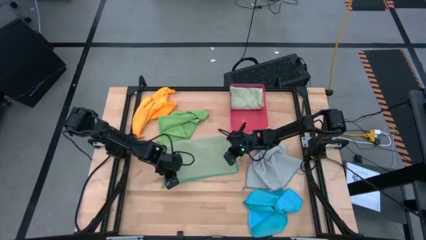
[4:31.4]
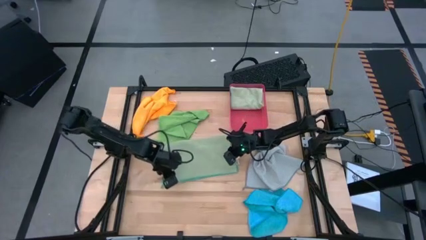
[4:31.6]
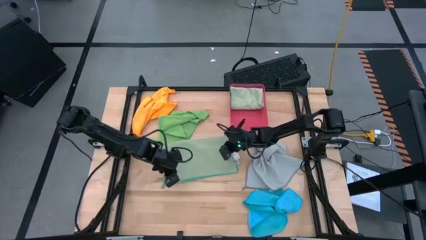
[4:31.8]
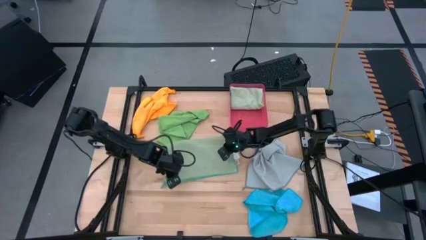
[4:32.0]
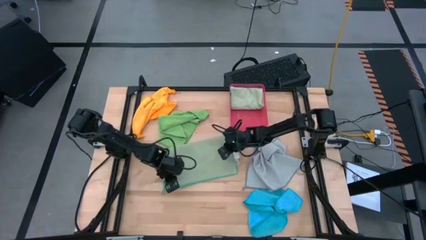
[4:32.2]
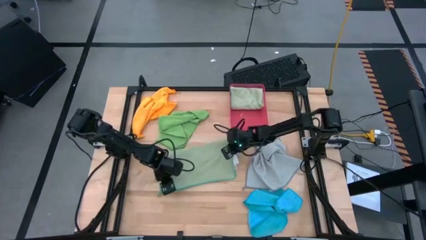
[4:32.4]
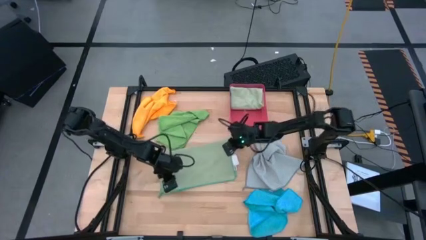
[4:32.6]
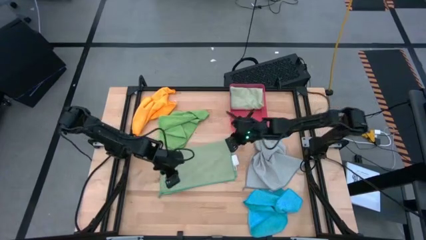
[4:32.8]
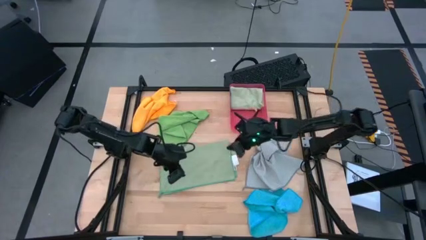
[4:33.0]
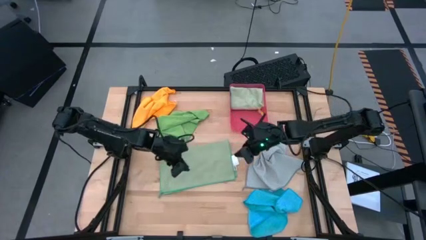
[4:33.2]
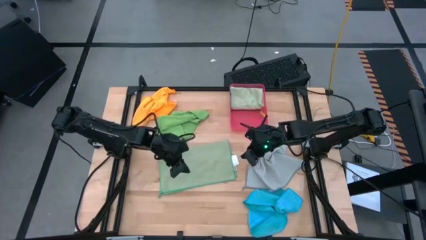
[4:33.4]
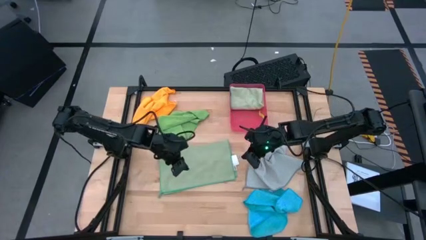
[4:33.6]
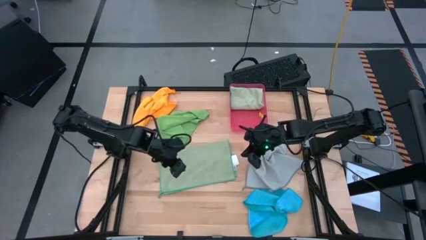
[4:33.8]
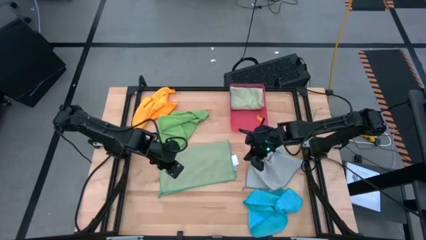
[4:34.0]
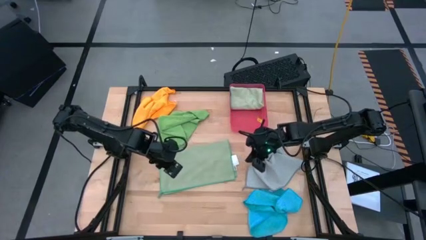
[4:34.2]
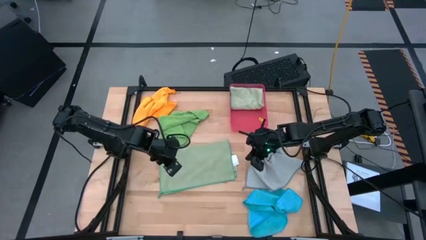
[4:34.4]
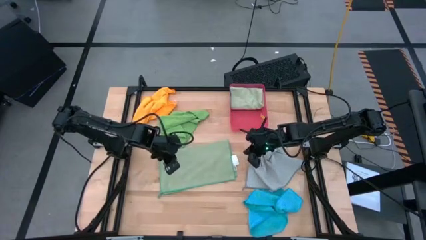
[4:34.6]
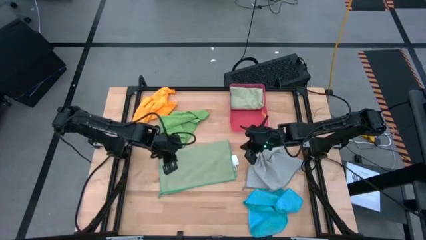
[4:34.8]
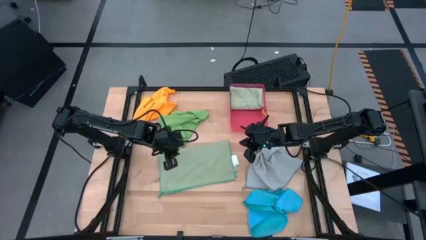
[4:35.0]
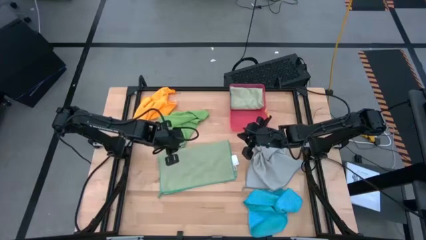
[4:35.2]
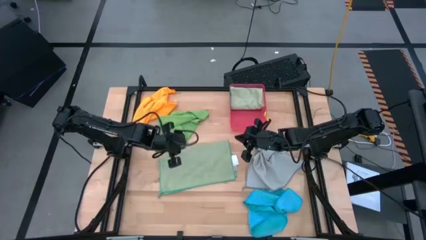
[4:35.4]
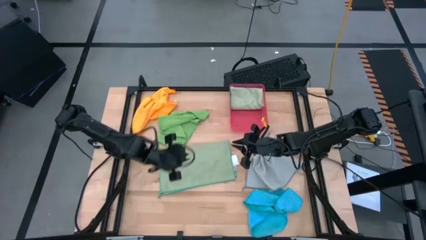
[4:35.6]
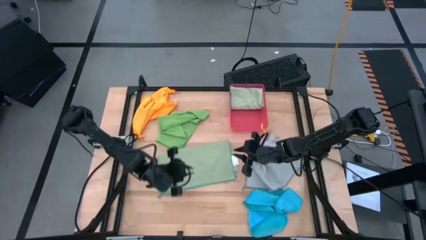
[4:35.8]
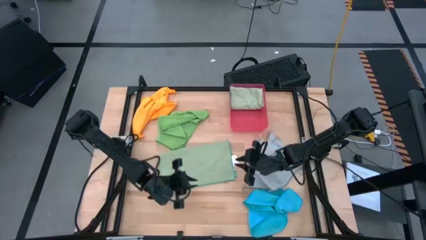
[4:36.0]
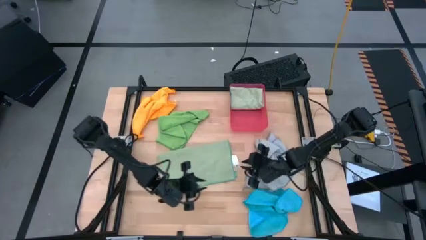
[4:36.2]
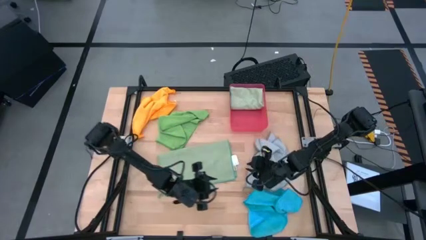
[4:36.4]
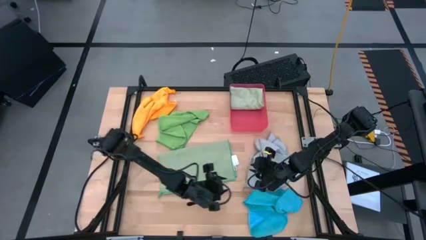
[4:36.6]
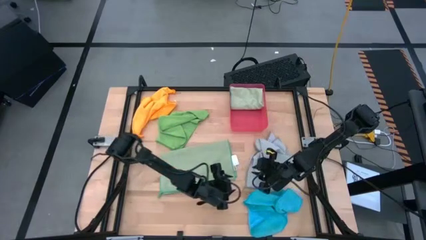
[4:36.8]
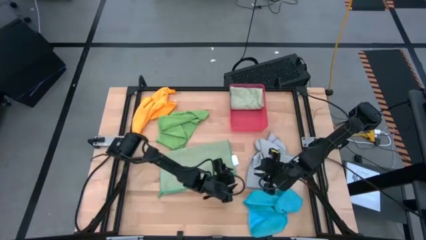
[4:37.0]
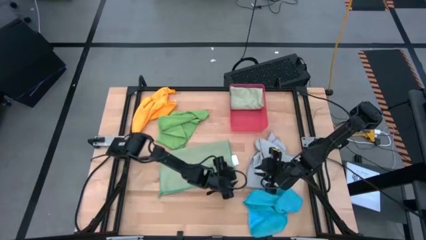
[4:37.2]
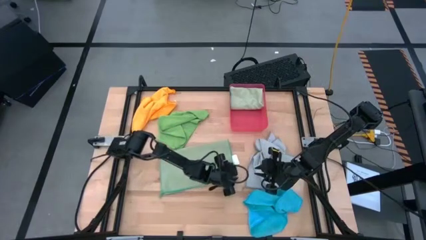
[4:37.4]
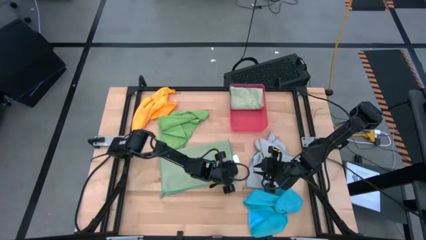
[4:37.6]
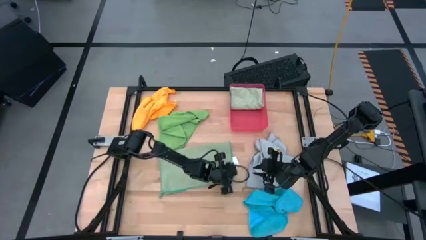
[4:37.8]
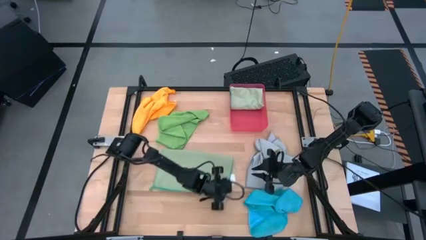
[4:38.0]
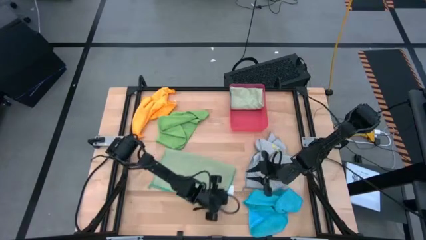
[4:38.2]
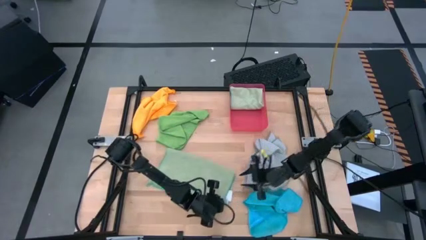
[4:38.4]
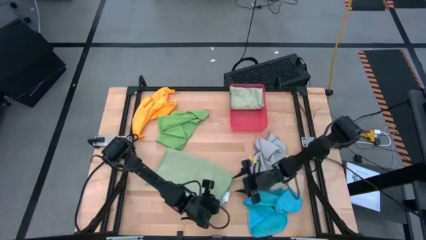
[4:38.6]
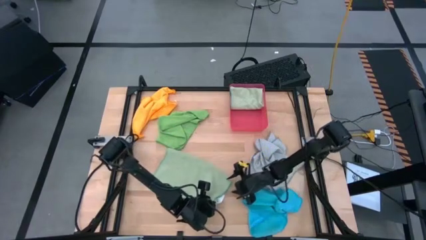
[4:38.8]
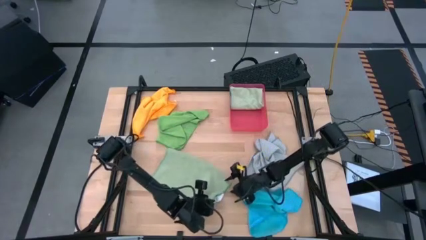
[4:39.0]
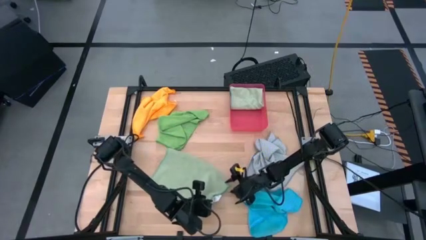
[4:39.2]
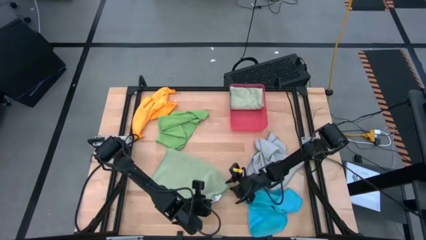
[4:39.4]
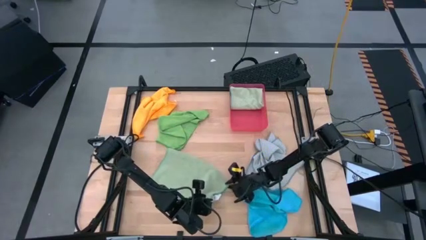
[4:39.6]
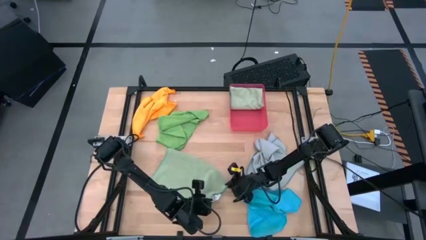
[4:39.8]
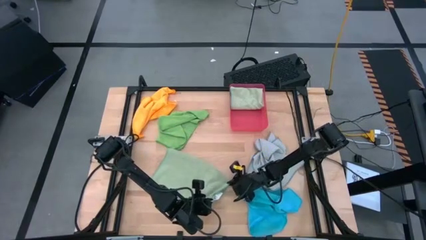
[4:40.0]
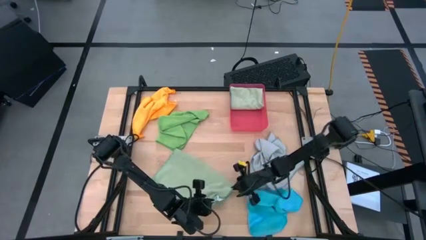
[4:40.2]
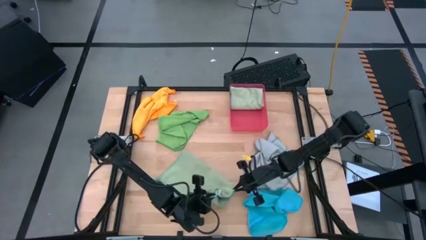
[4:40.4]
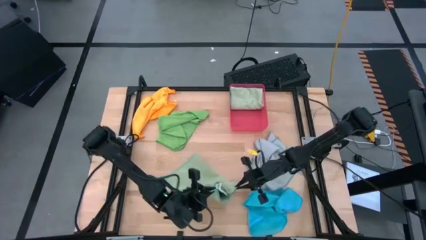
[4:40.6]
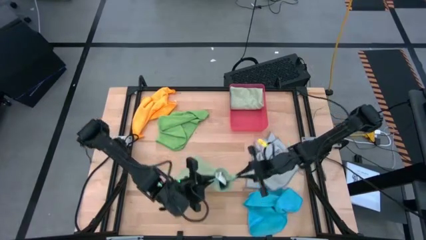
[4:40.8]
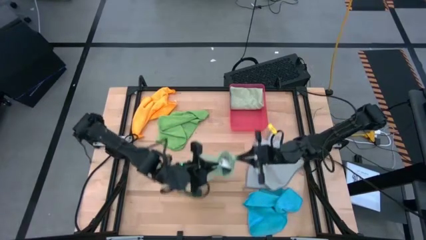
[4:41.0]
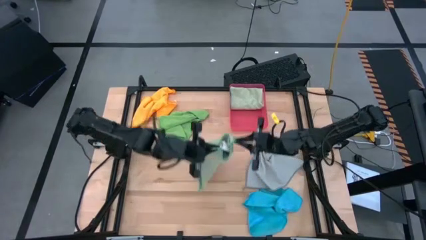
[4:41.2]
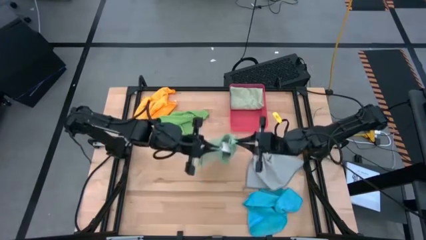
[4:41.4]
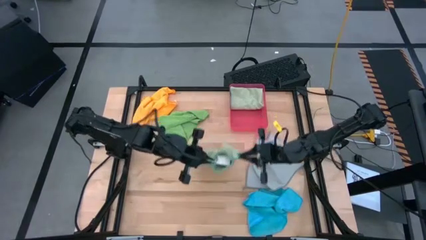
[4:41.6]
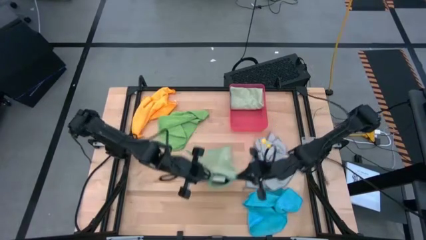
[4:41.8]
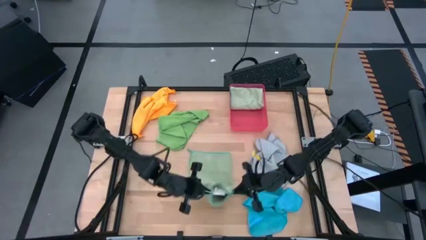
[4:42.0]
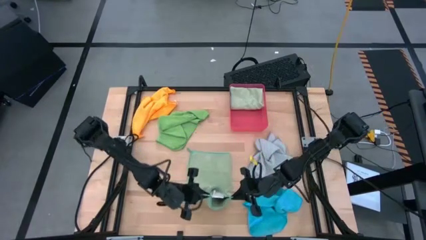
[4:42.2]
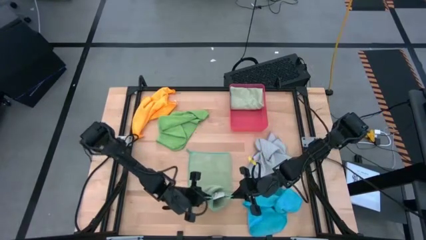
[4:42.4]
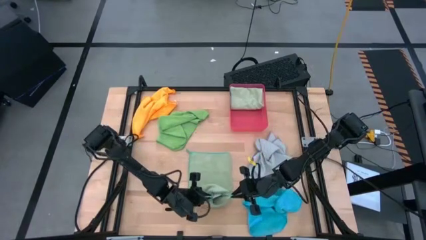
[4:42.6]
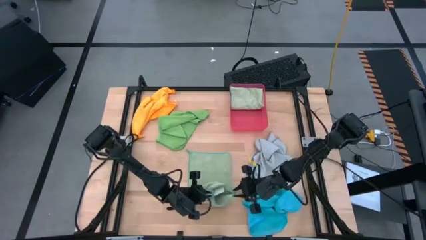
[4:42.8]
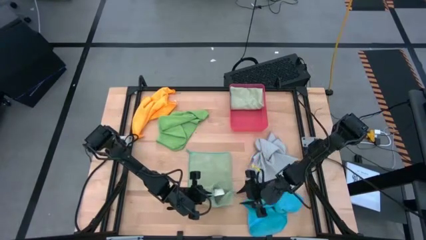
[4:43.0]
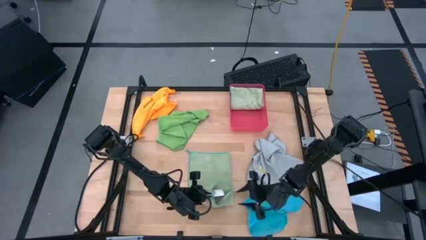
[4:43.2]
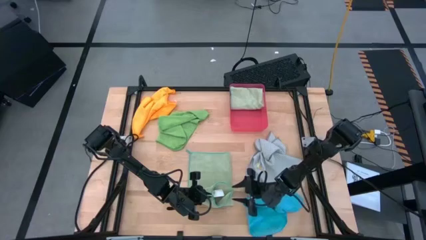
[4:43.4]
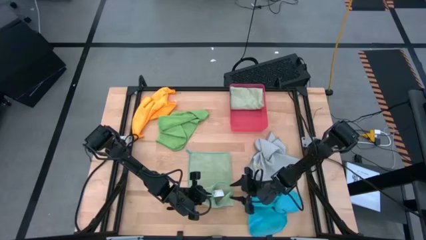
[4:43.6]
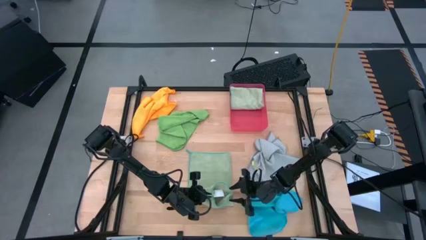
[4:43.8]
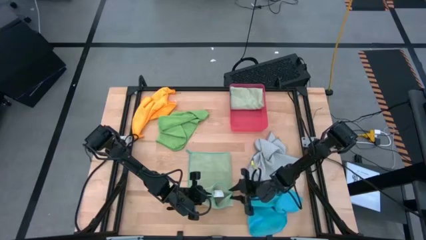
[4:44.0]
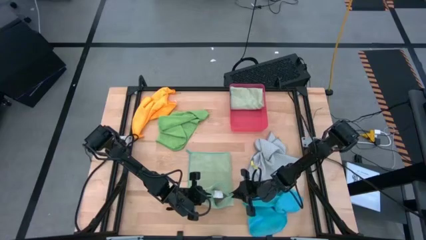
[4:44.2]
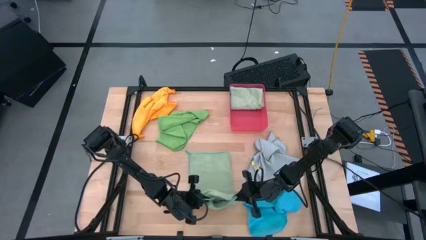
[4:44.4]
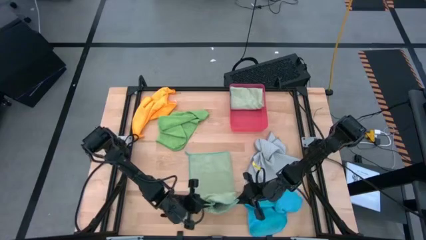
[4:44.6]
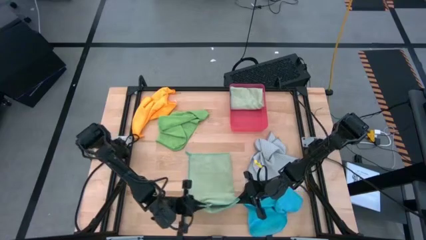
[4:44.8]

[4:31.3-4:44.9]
Task: Fold microfiber towels
Fold the light green microfiber cloth

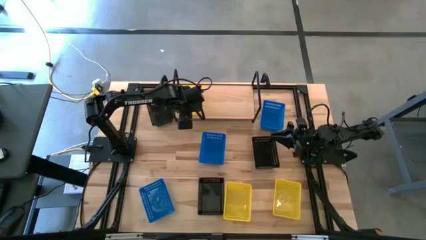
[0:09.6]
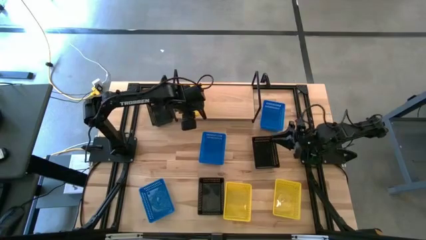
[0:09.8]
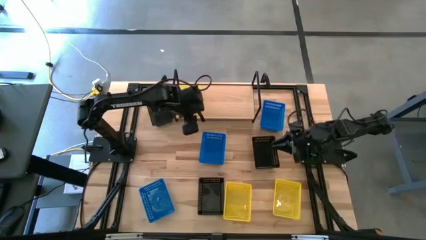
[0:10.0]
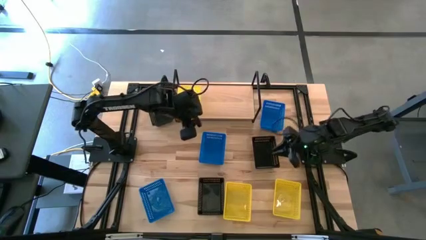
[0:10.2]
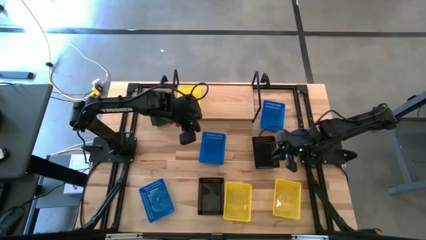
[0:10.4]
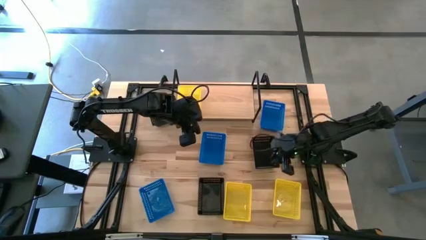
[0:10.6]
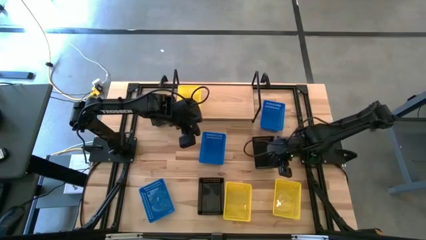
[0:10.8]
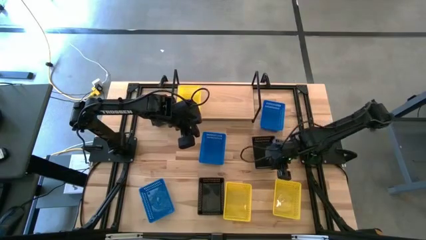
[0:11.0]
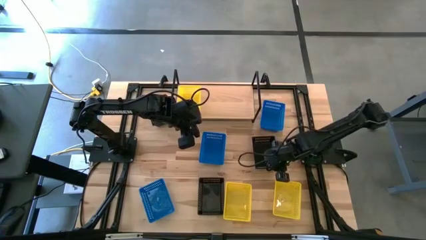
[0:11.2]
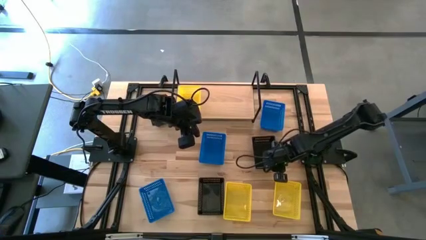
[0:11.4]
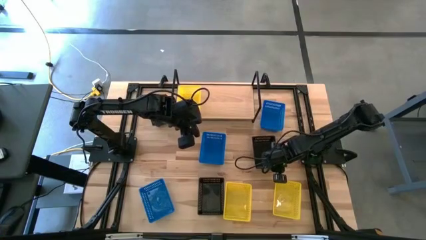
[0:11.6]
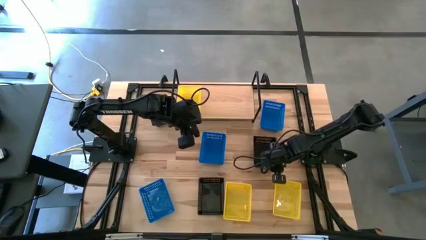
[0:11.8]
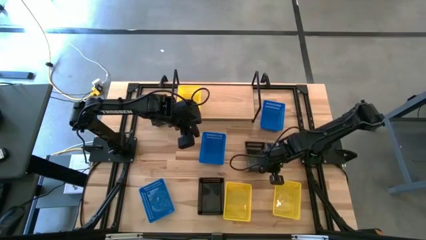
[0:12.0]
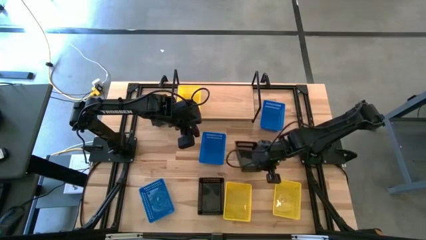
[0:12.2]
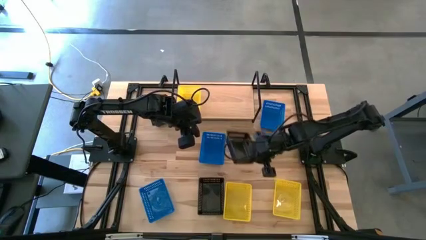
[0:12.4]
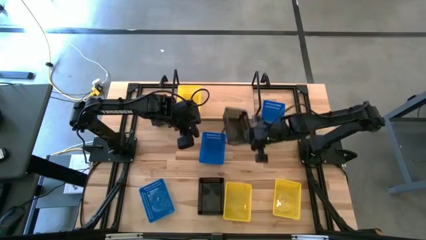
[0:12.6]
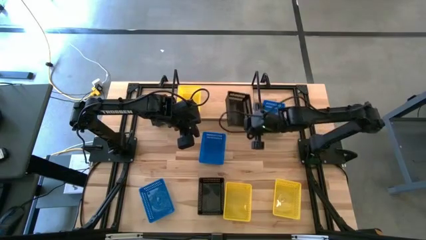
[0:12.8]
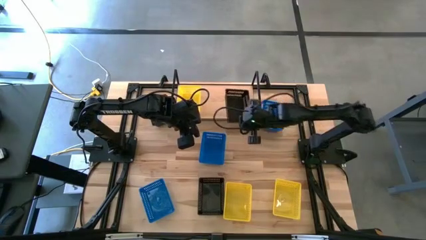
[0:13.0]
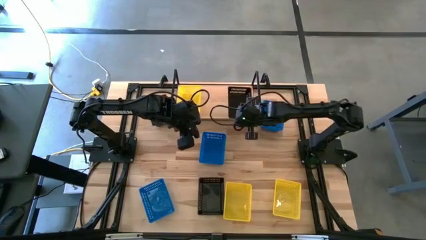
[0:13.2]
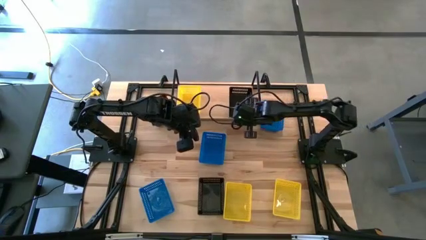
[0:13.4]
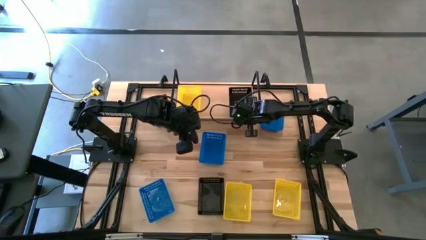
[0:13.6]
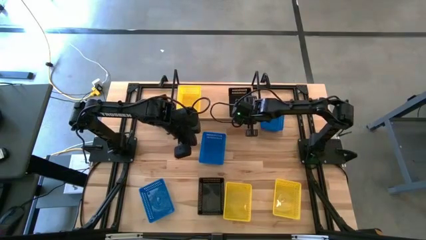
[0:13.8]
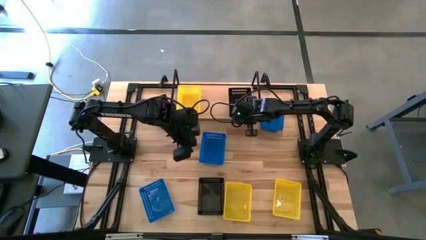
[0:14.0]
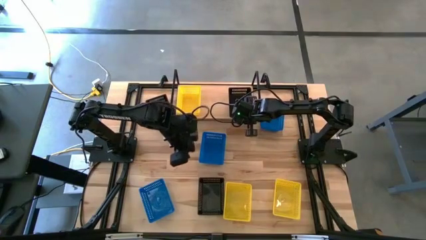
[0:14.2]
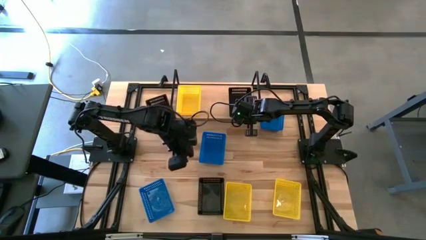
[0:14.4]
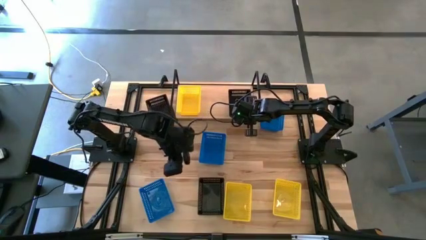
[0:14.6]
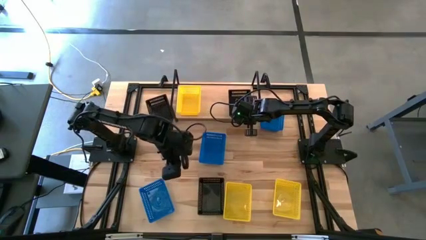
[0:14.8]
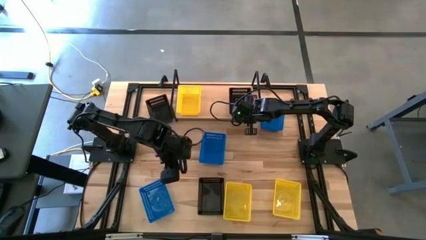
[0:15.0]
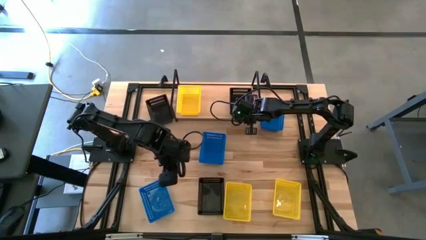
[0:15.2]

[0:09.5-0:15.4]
Task: Stack baskets on shelf by color
Put the right black bin on the shelf
